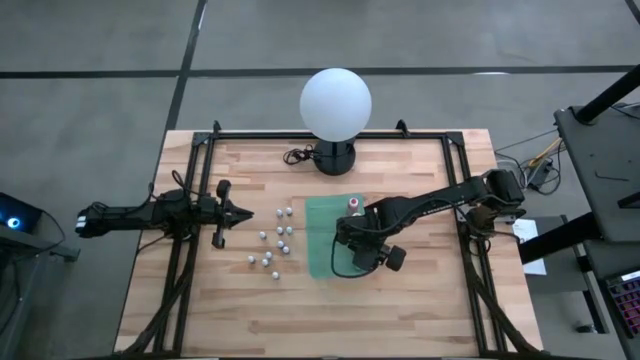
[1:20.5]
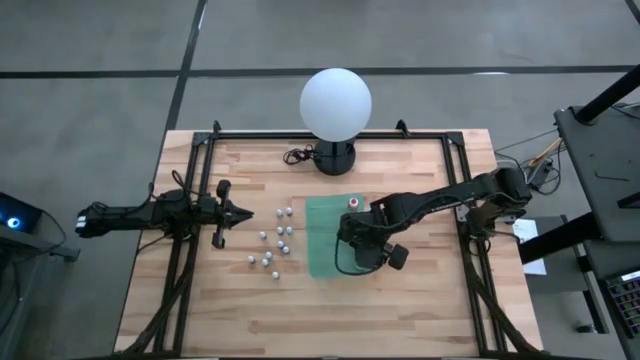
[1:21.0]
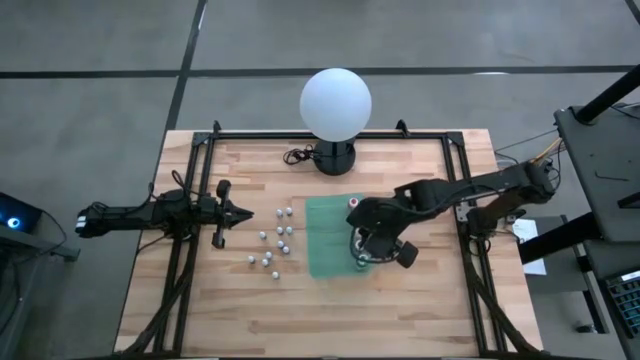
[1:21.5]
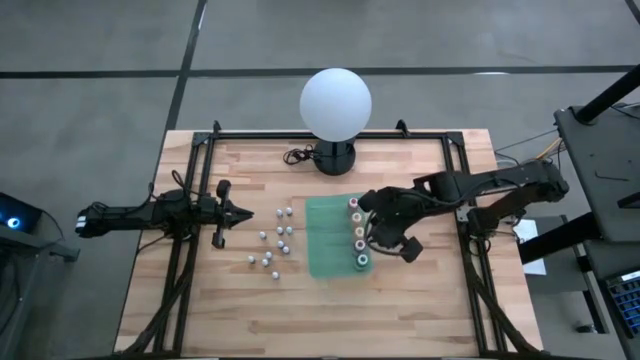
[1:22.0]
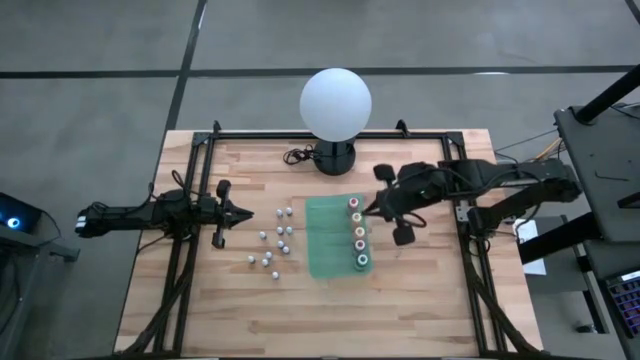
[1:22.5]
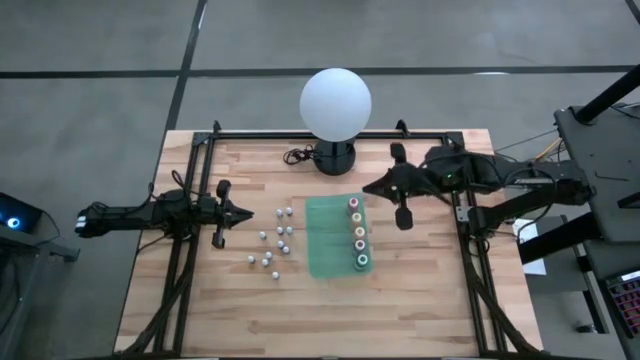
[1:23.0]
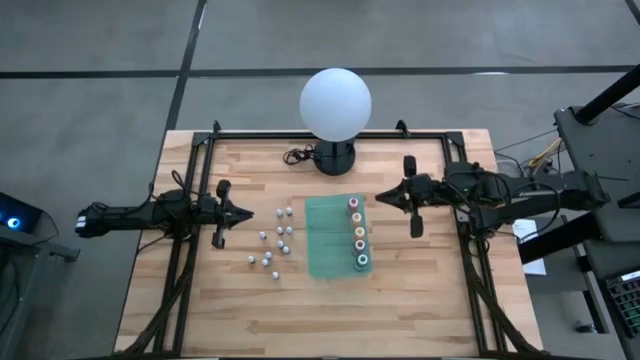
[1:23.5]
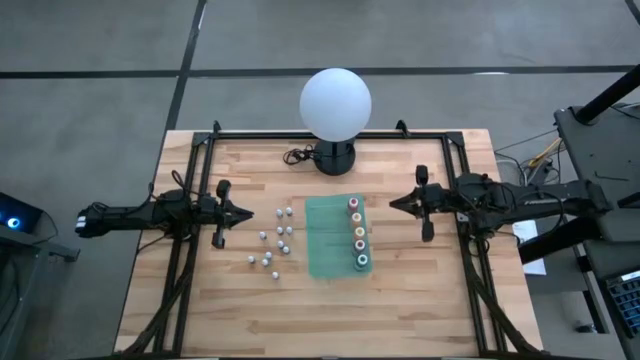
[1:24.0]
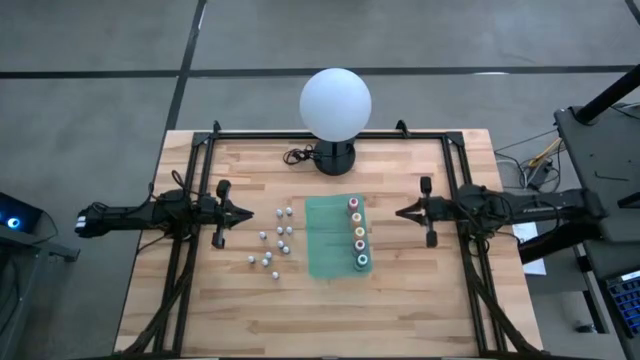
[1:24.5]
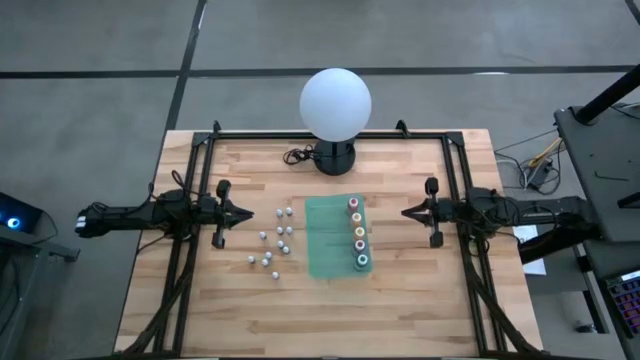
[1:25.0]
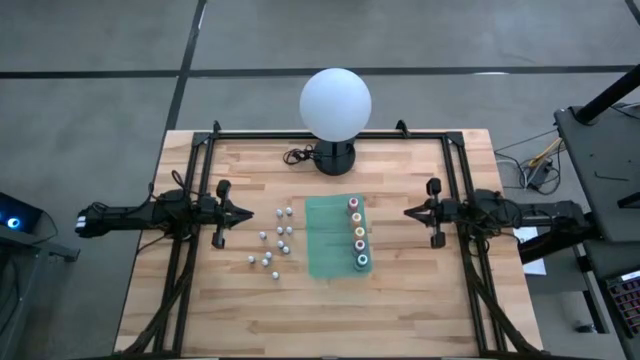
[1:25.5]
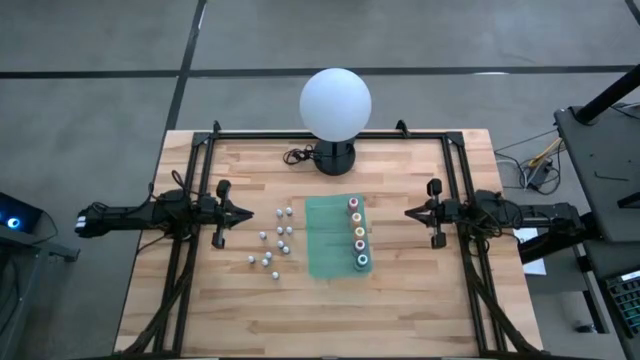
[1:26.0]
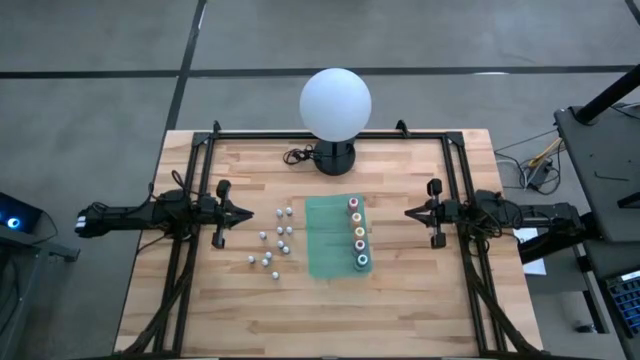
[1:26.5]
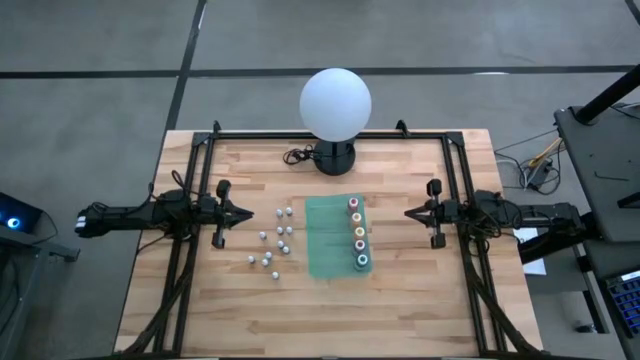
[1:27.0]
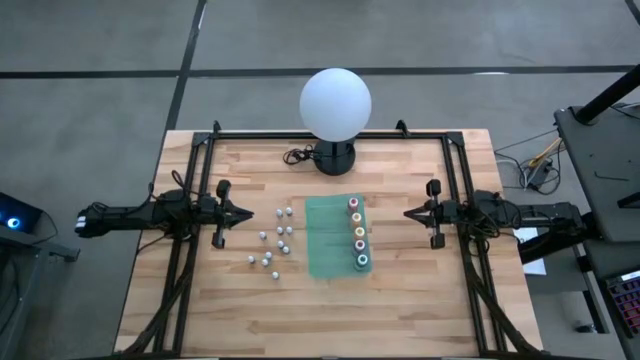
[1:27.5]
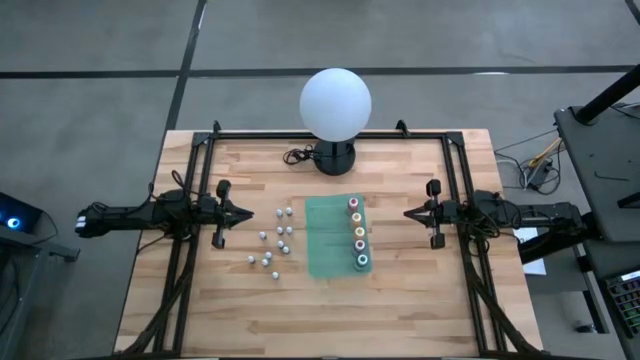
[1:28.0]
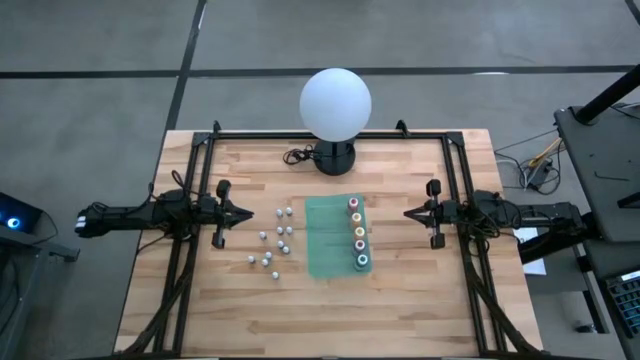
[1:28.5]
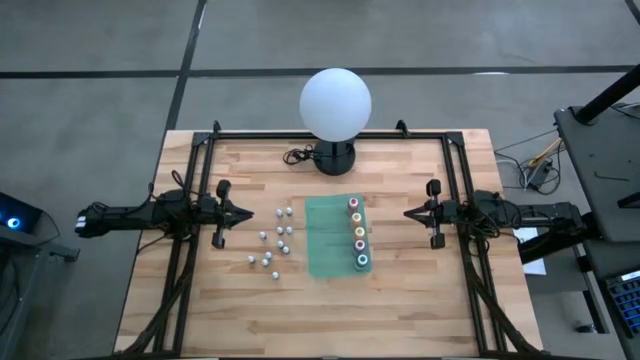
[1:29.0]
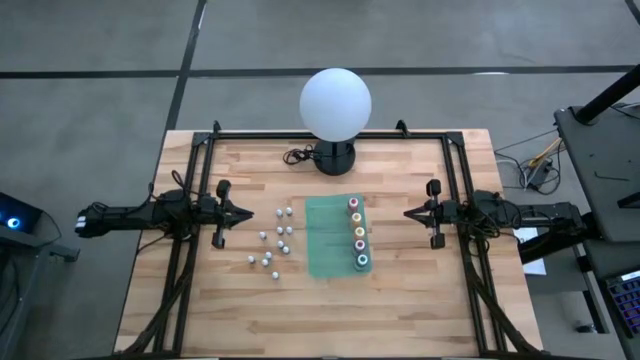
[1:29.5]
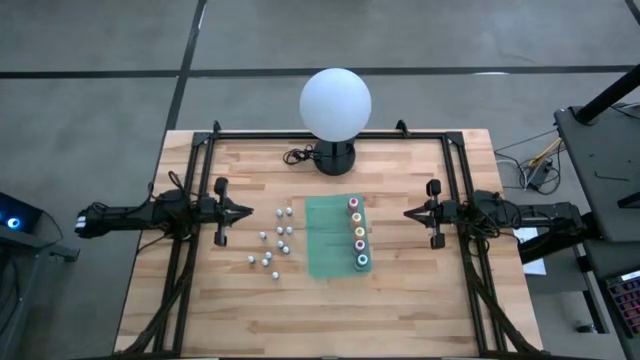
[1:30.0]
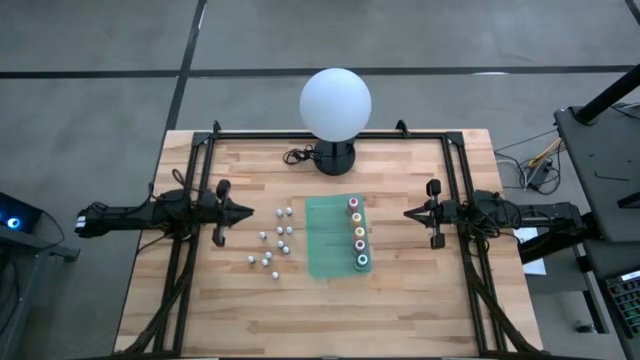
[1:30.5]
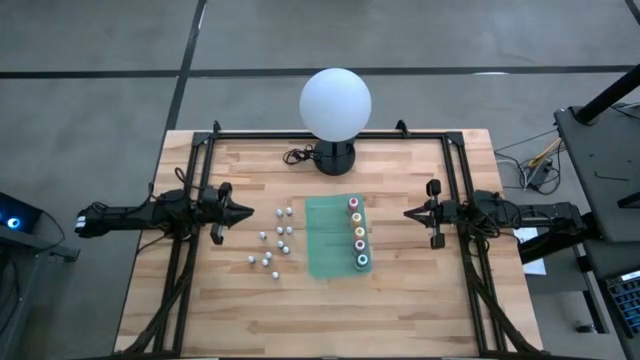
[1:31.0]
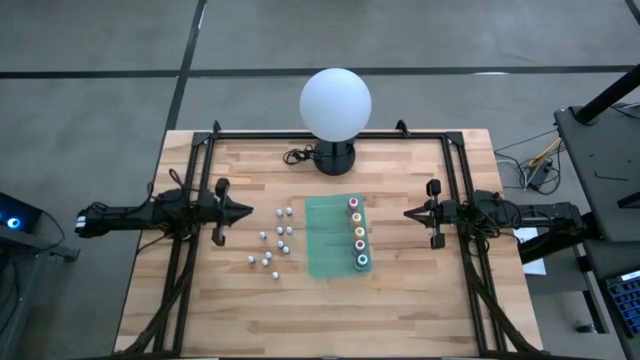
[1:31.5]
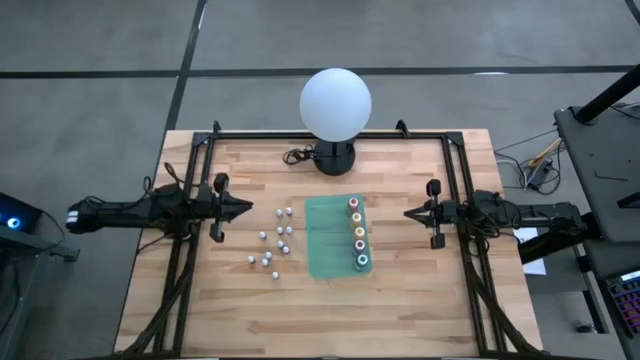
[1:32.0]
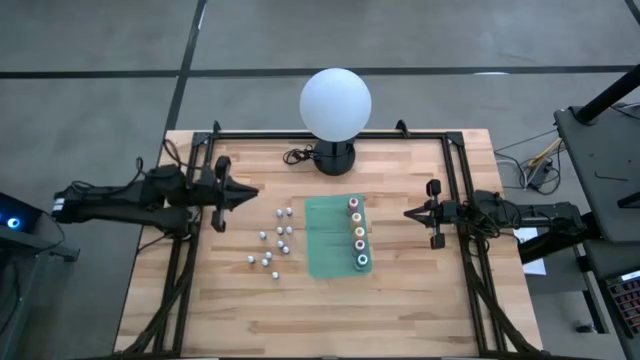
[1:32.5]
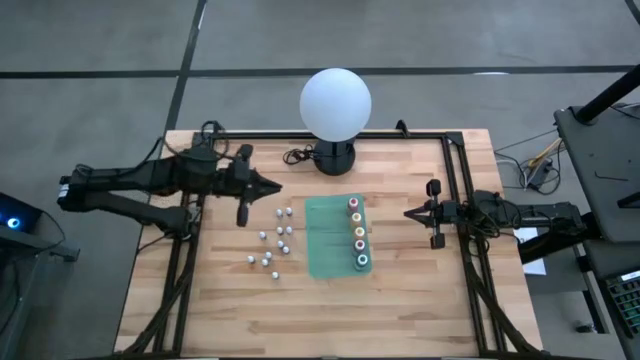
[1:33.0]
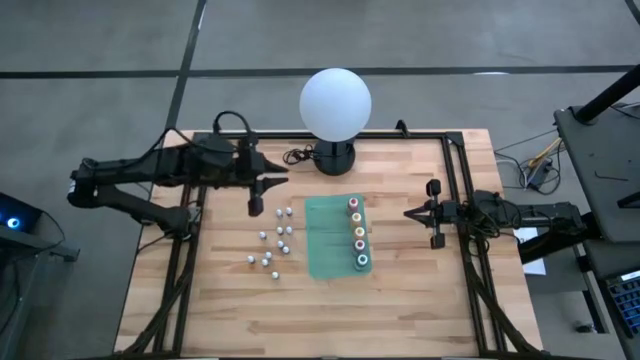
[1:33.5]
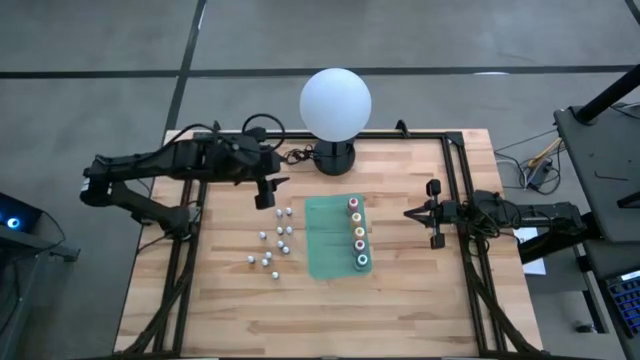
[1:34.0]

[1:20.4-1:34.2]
Task: Pick & Place food coloring
Put the small orange food coloring bottle into the green bin

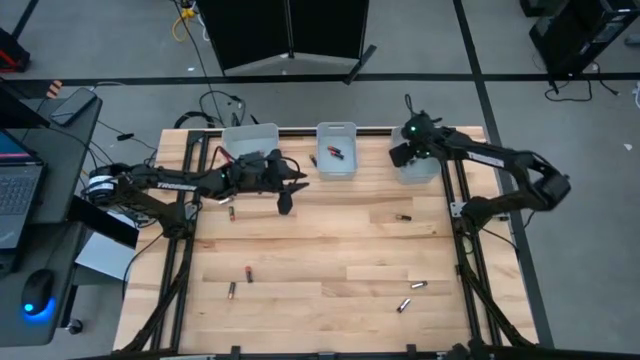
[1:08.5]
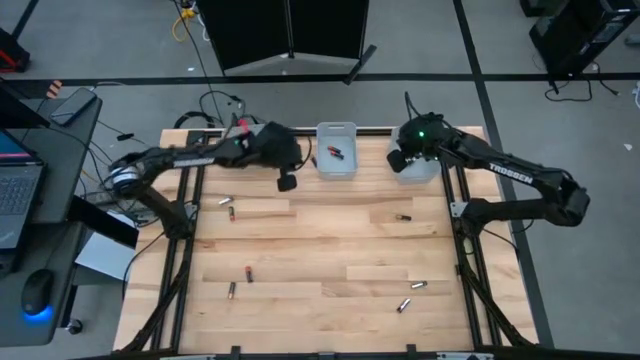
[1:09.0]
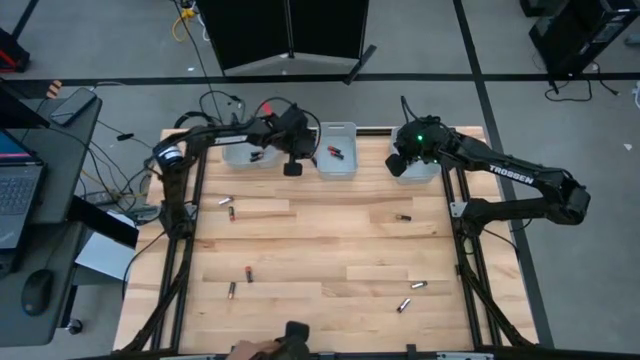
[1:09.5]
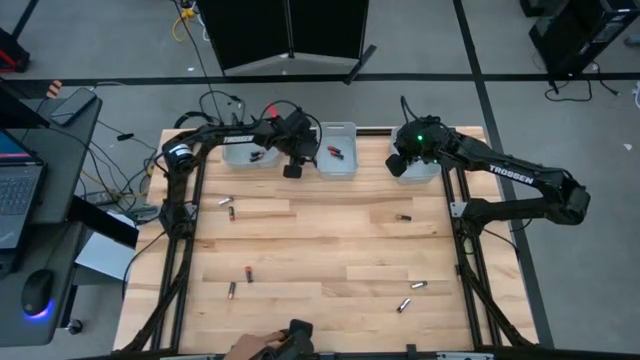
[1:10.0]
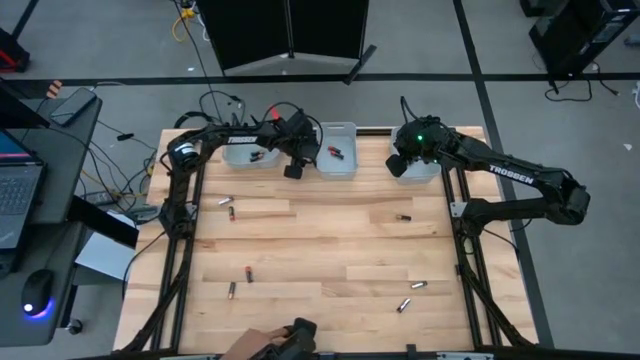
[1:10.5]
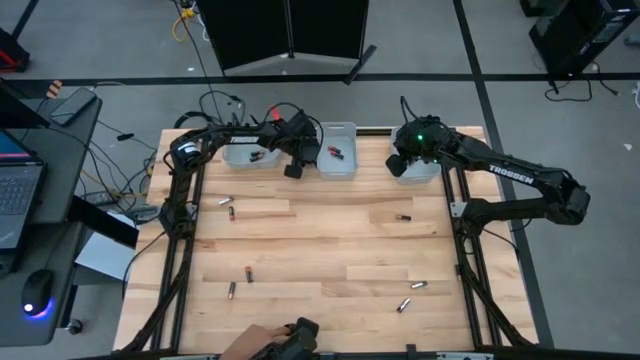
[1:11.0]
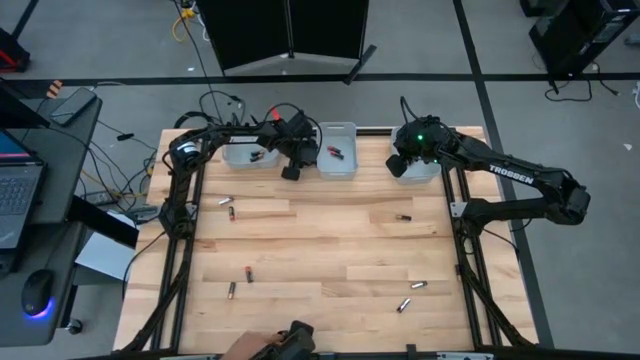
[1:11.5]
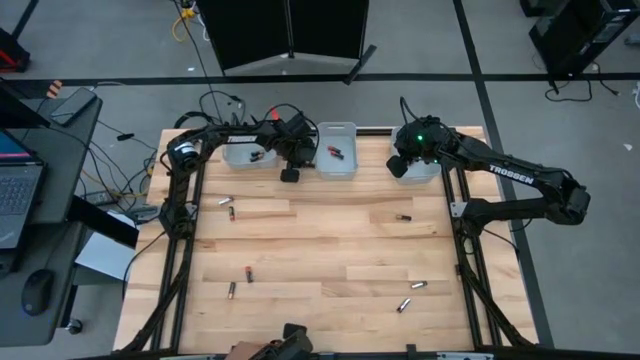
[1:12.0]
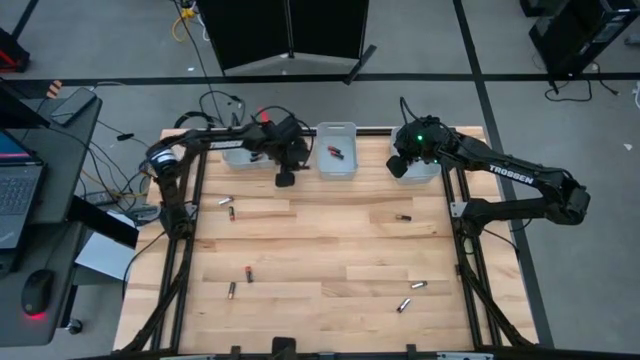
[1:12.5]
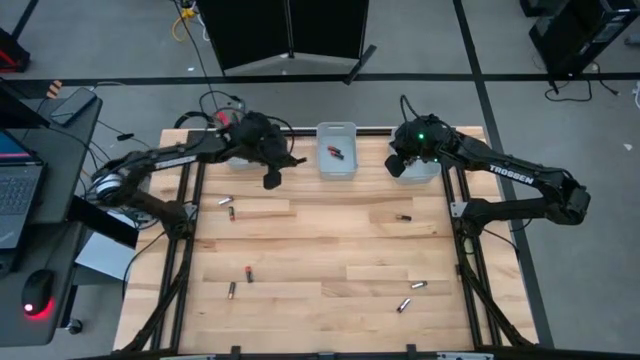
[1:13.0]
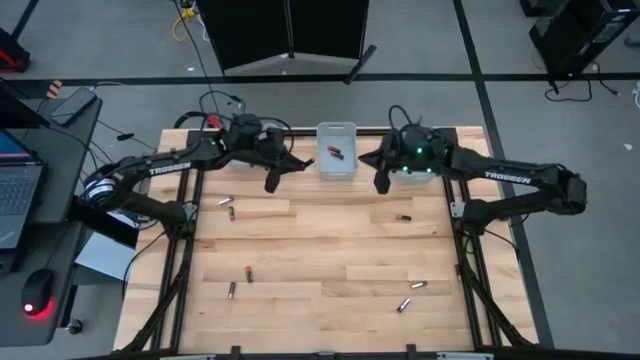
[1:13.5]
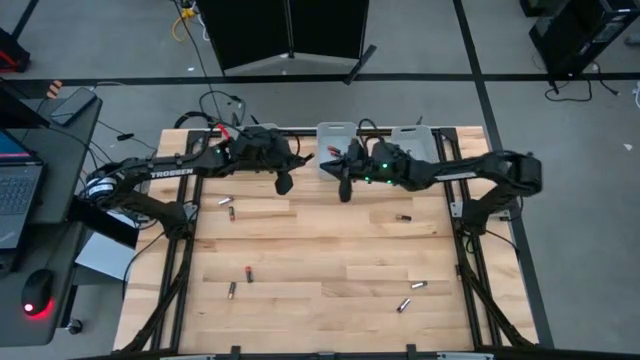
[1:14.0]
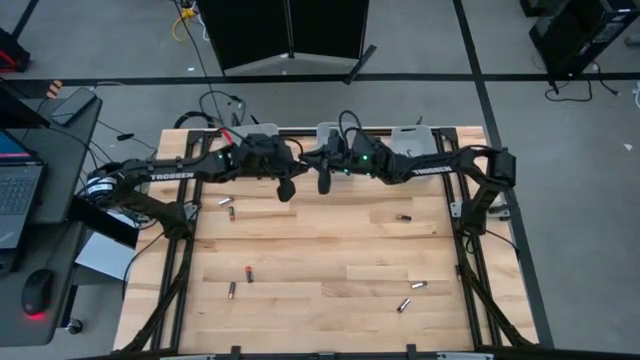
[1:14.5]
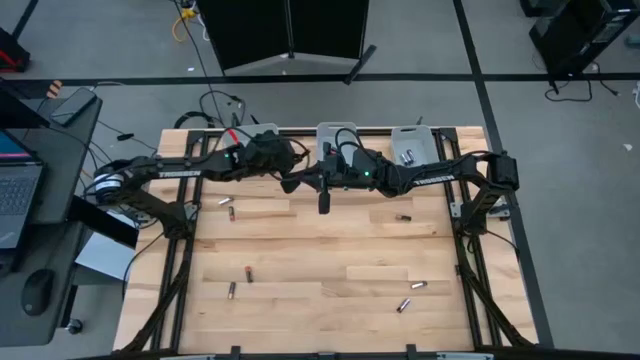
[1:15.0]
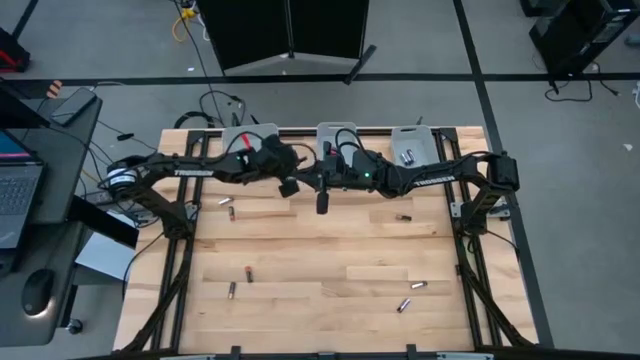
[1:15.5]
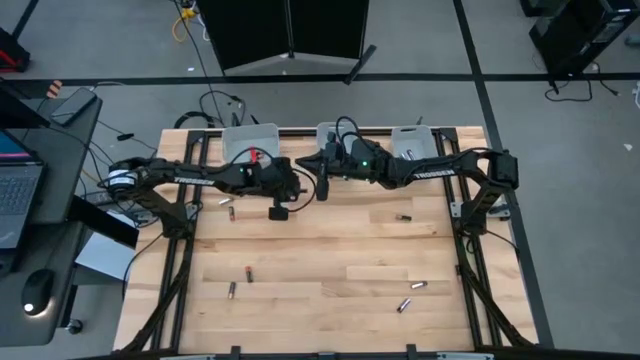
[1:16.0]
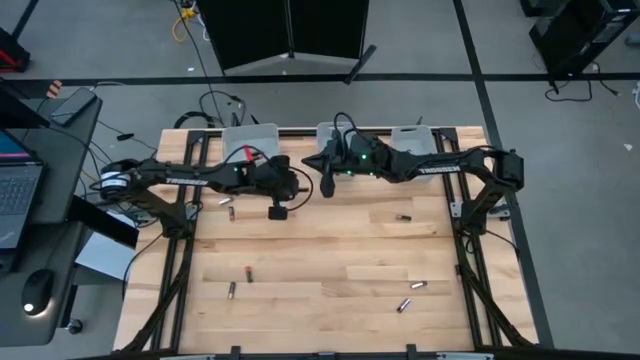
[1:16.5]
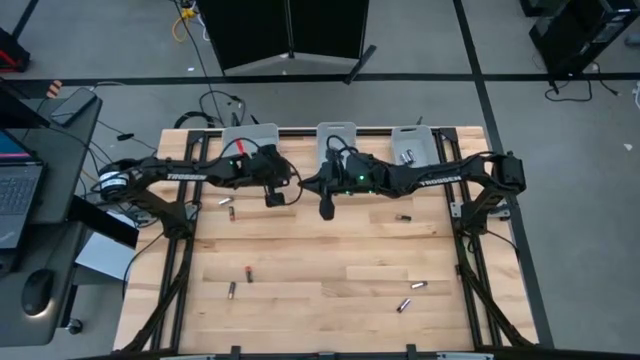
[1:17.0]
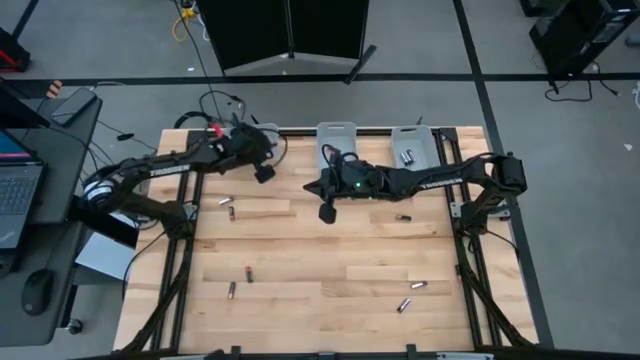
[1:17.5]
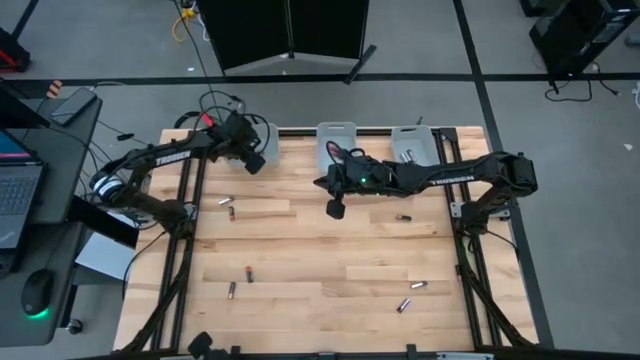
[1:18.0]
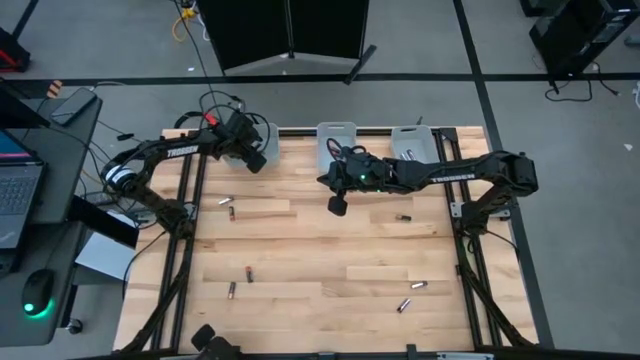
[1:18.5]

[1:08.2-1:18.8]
Task: Sort batteries
Put the black brown battery into the left bin
